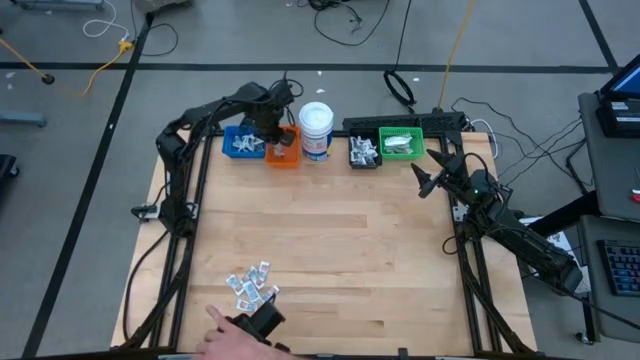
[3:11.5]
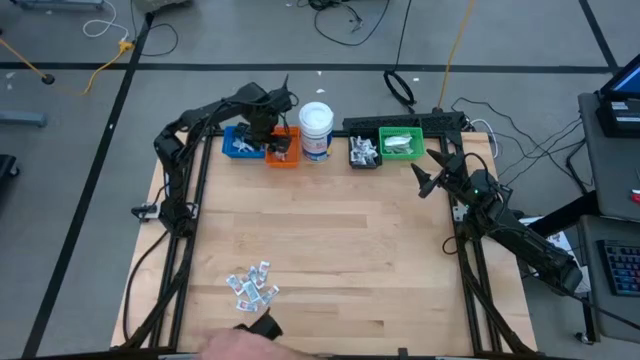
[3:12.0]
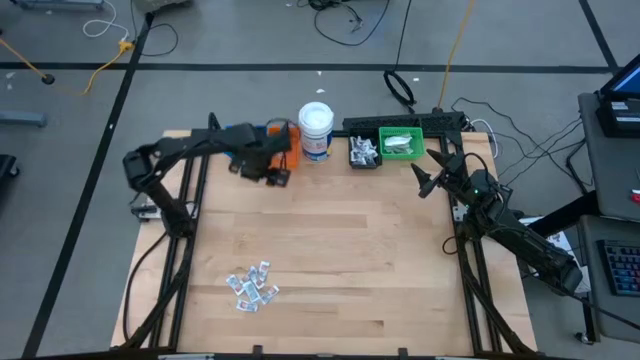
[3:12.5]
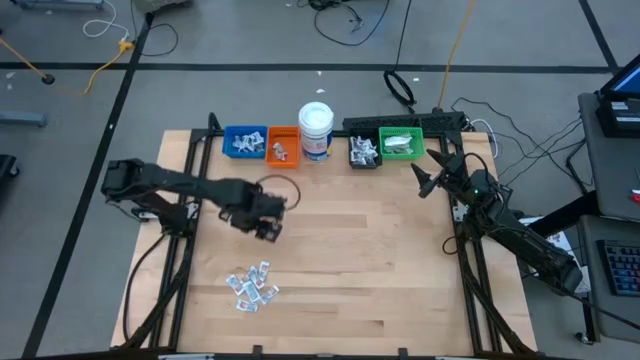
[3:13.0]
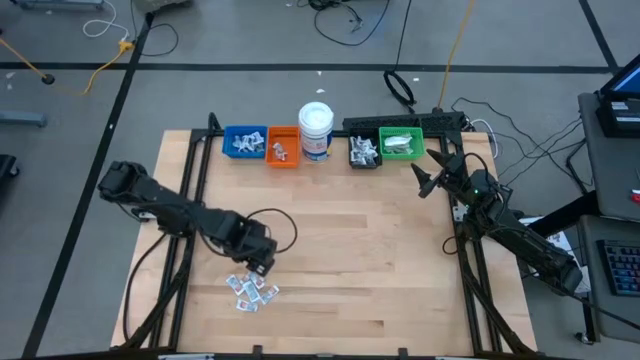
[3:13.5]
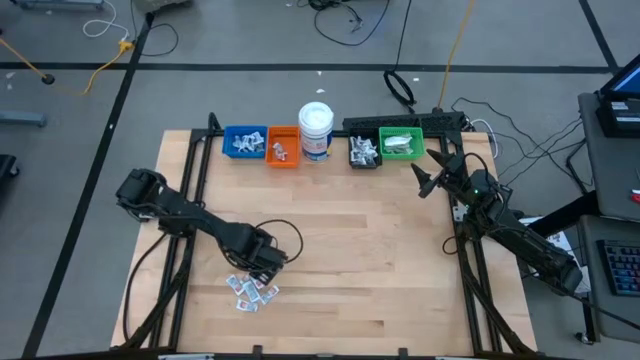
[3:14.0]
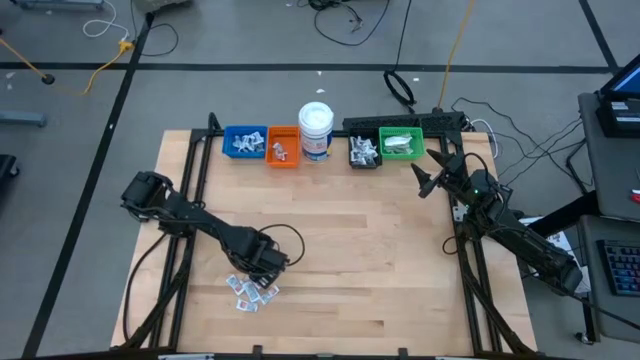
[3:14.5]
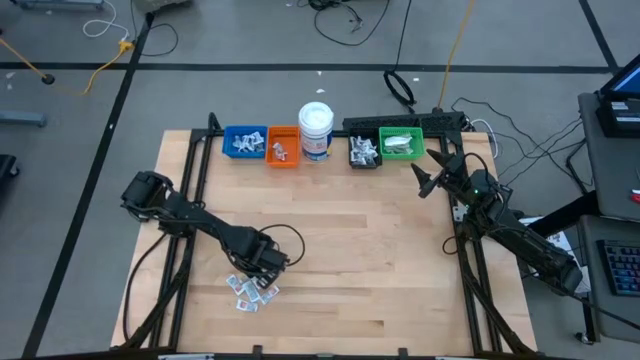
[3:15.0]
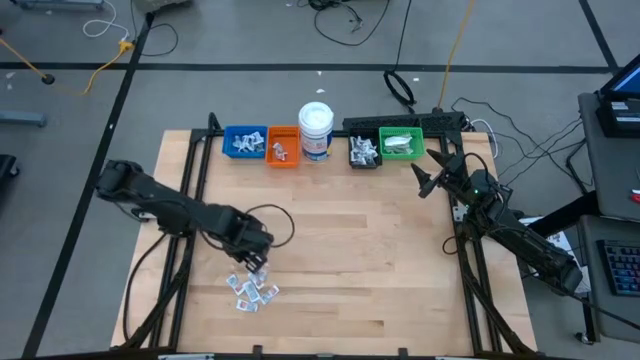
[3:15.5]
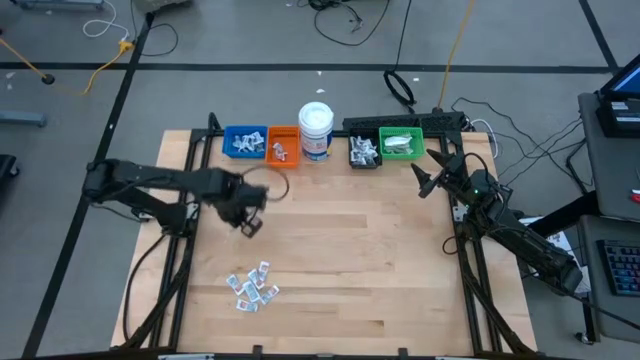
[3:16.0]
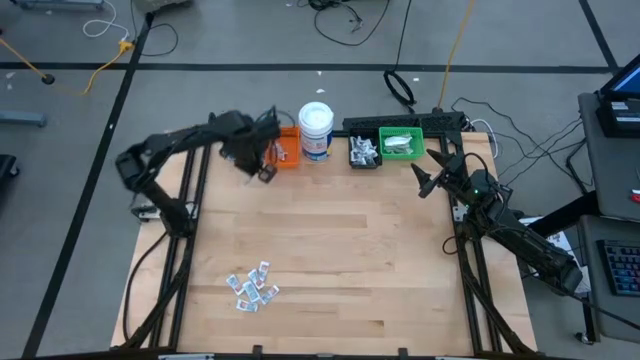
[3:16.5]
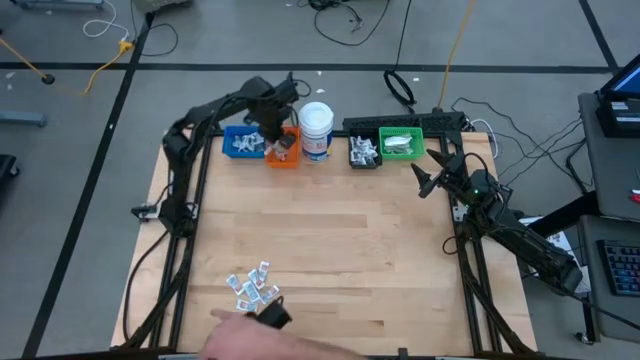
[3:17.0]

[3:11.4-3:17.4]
Task: Pick & Place First Aid Supplies
Put the ointment pack into the orange bin

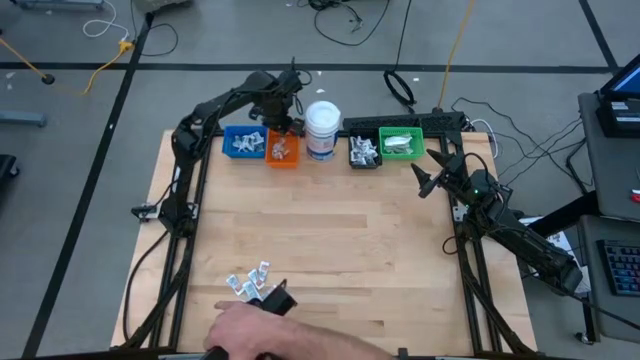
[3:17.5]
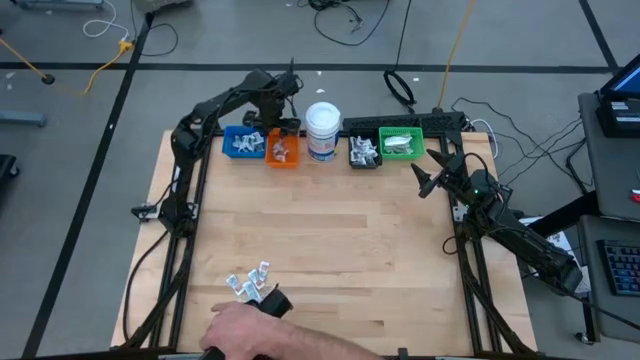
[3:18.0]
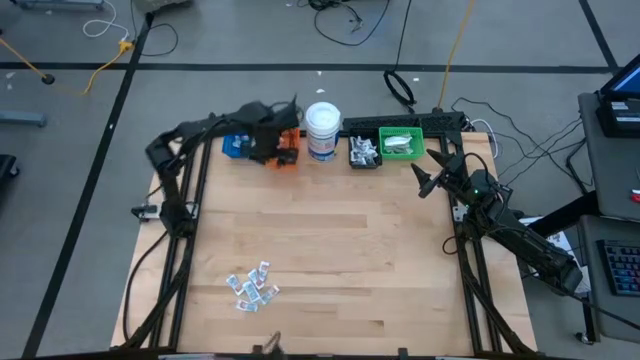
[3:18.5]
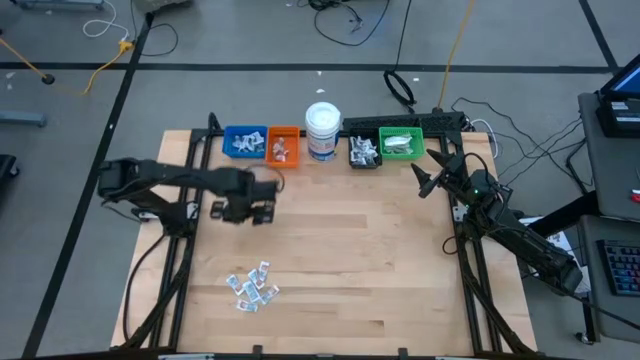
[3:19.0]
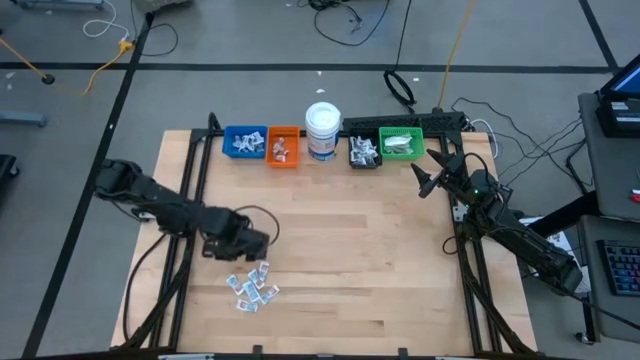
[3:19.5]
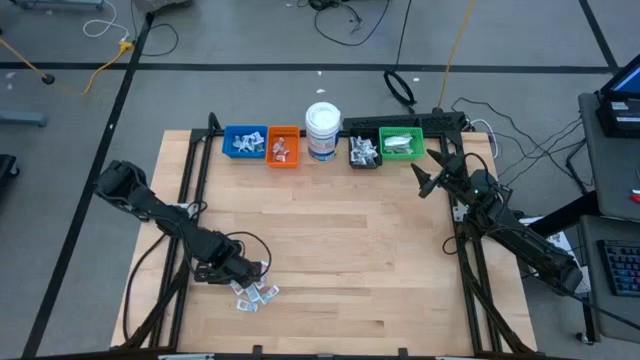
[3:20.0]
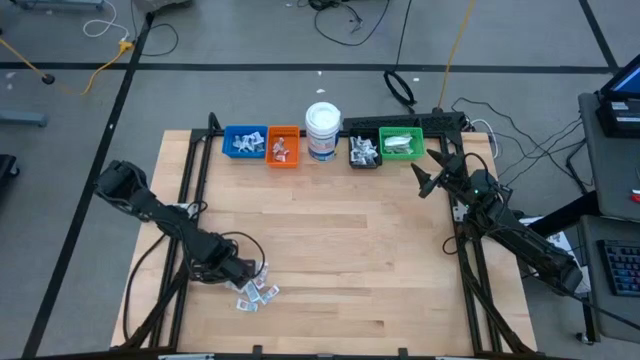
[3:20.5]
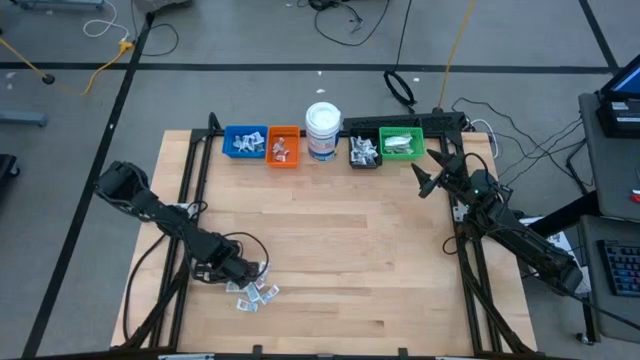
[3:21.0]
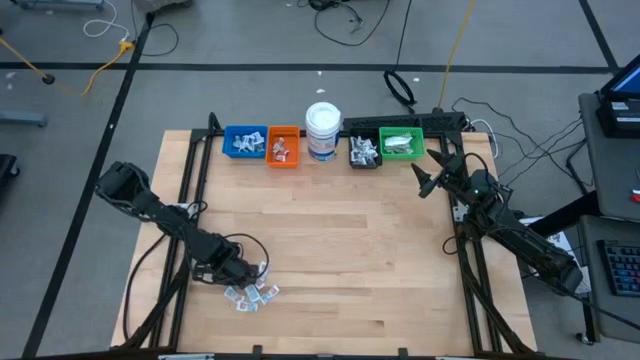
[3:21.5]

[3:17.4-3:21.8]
Put the ointment pack into the orange bin

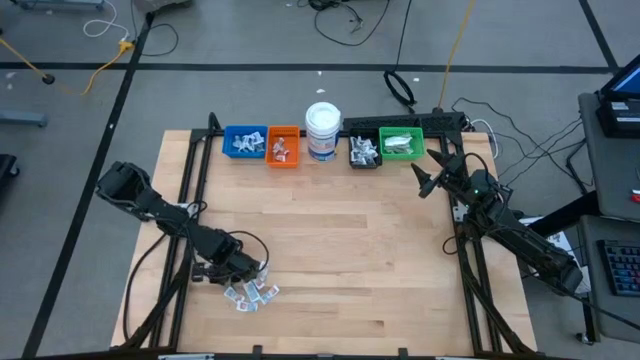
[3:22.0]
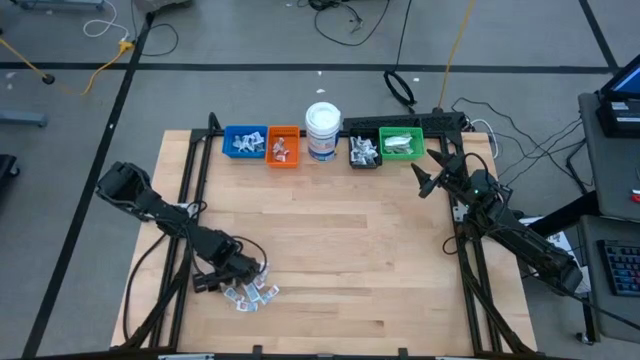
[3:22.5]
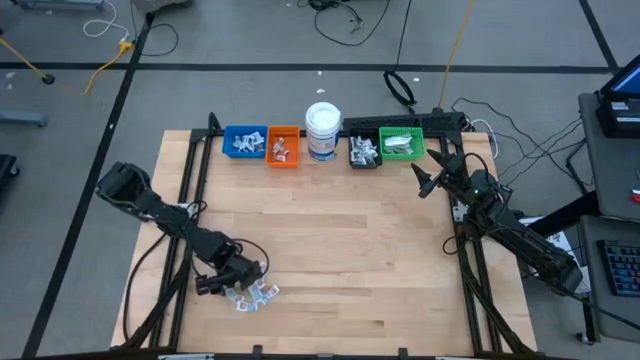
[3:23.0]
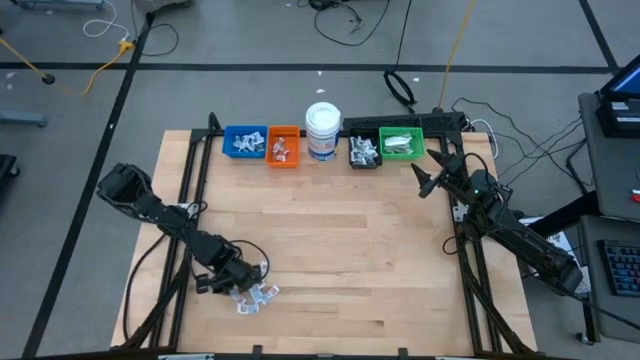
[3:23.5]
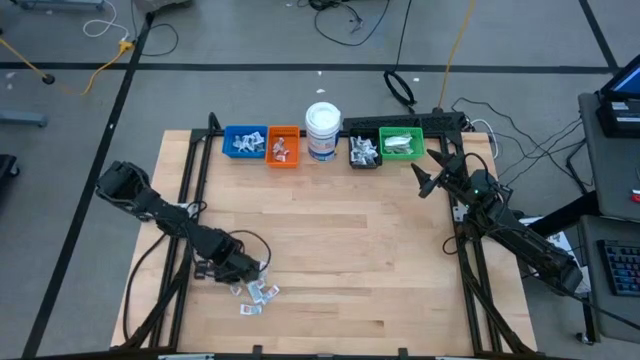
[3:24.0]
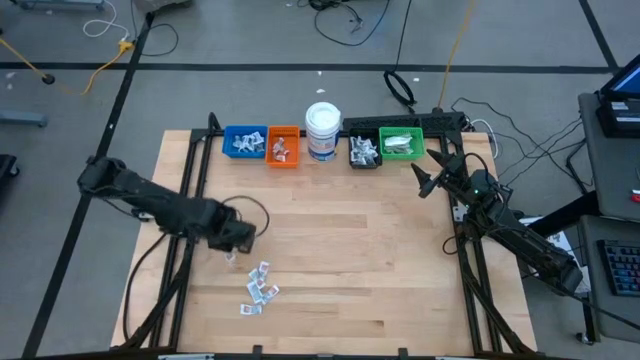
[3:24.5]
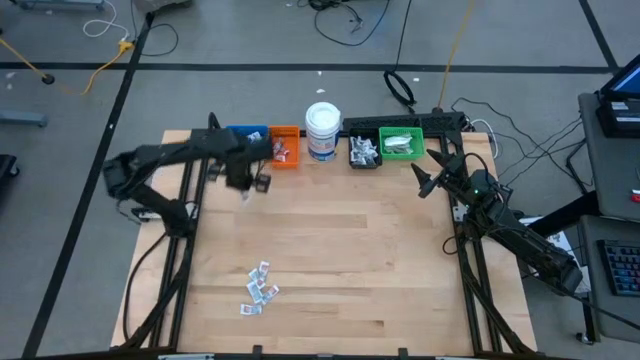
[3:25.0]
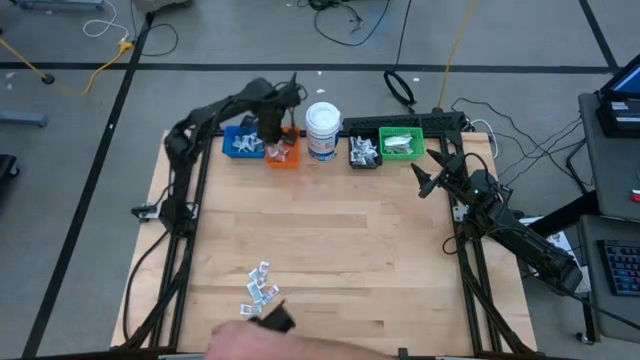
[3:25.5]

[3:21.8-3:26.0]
Put the ointment pack into the orange bin

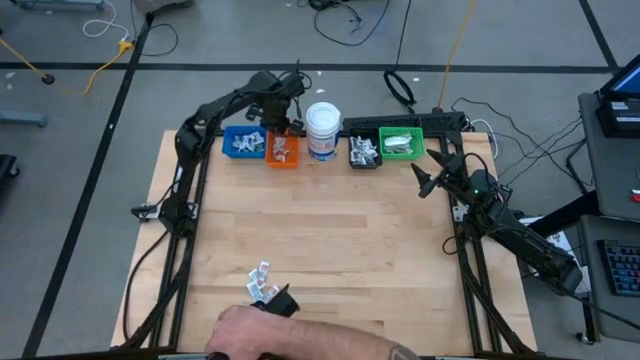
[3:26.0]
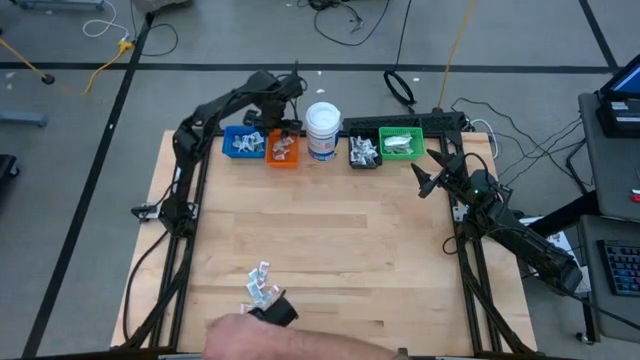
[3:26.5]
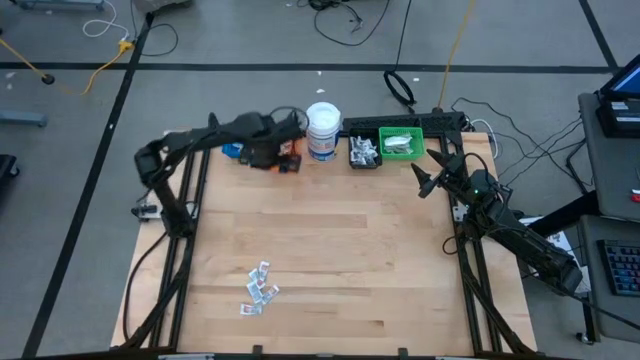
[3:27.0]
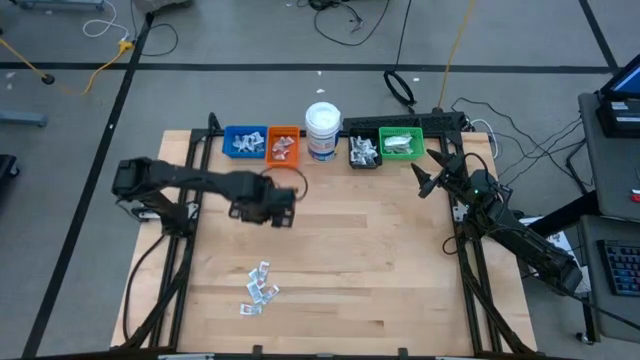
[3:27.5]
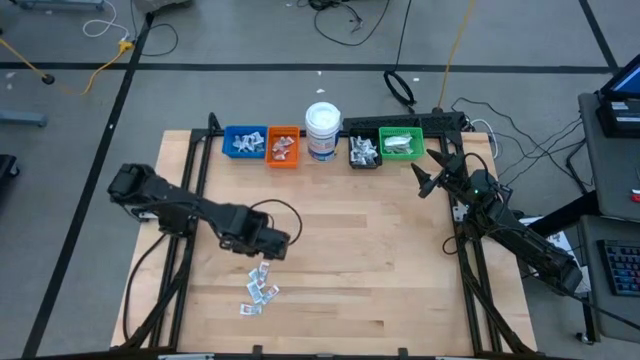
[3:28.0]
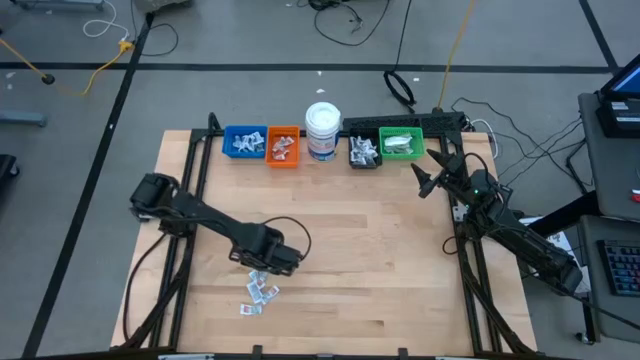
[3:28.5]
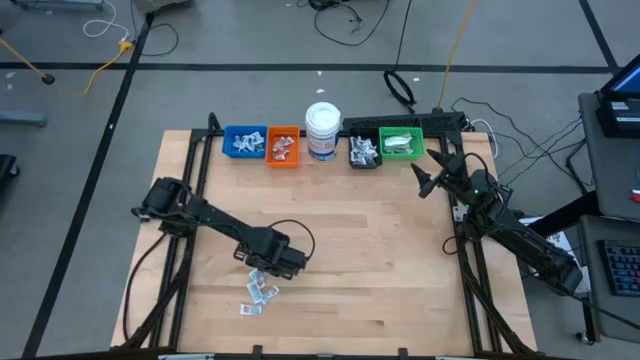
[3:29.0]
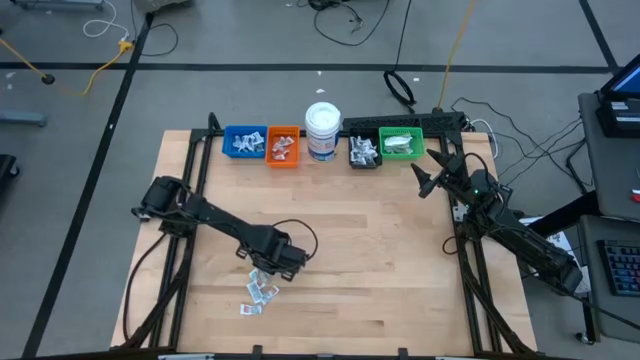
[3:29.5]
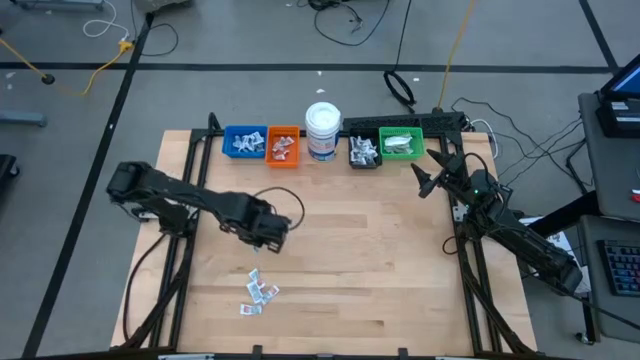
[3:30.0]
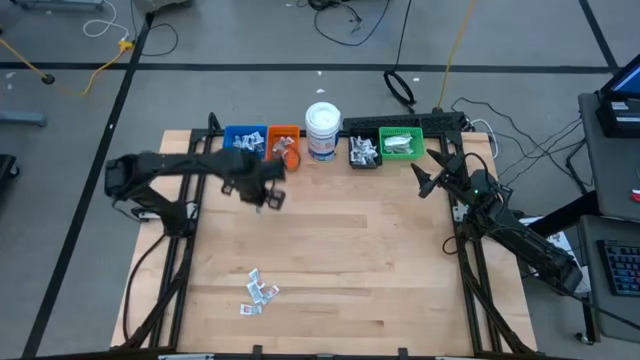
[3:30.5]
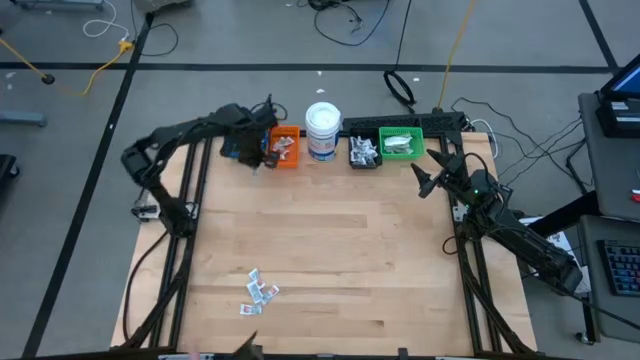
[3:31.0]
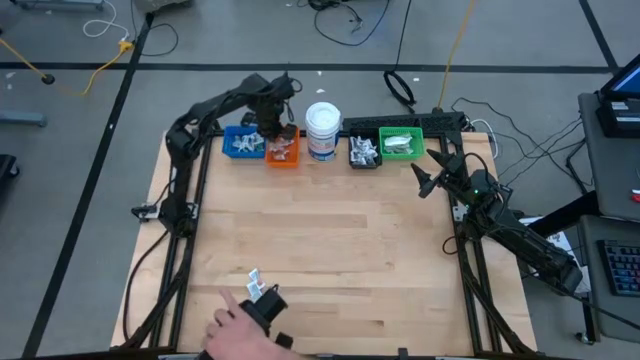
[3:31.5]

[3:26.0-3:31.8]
Put the ointment pack into the orange bin
